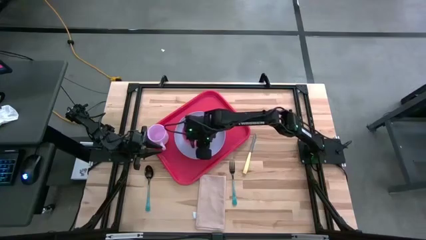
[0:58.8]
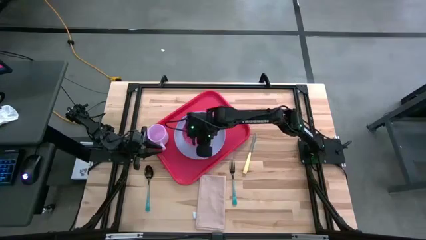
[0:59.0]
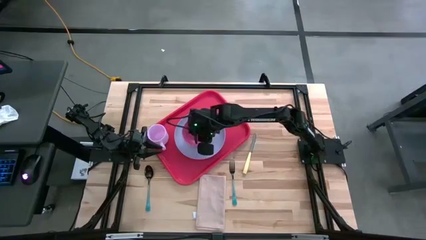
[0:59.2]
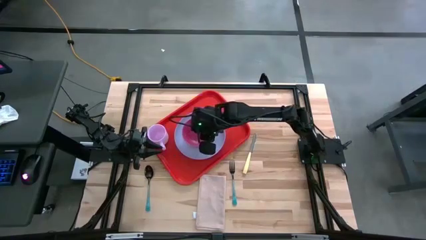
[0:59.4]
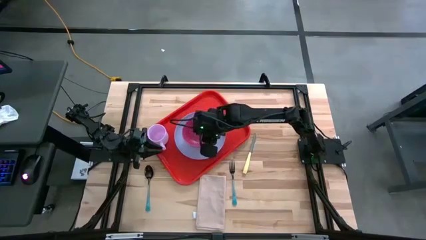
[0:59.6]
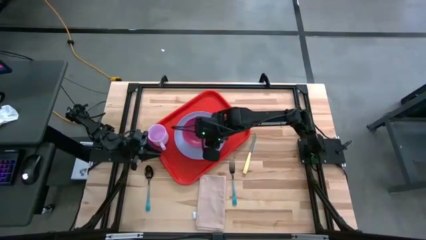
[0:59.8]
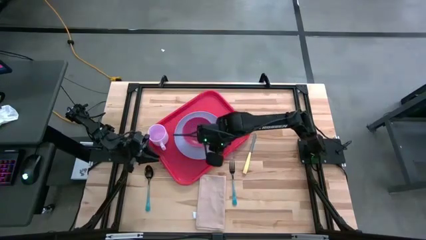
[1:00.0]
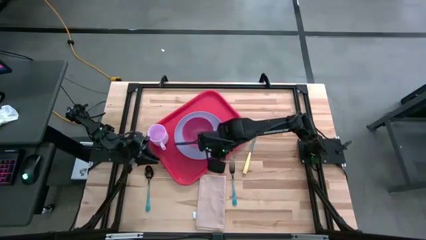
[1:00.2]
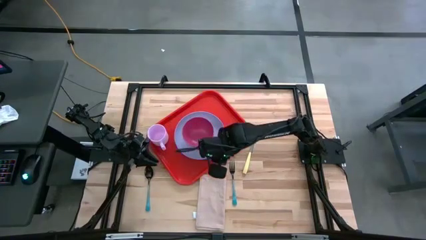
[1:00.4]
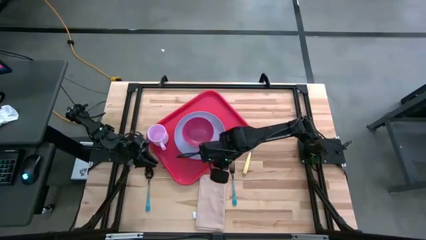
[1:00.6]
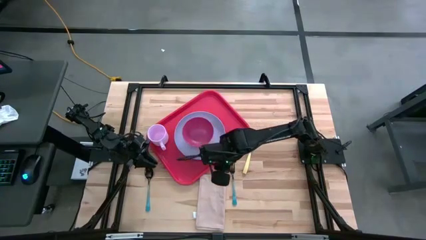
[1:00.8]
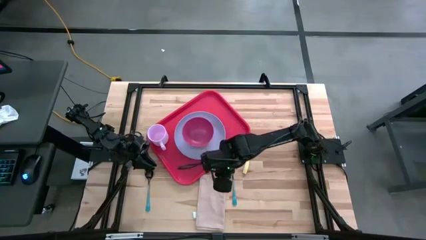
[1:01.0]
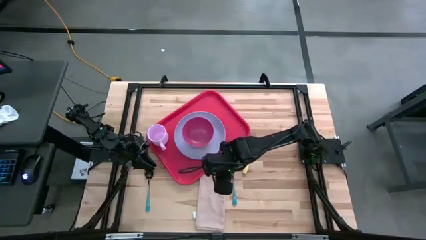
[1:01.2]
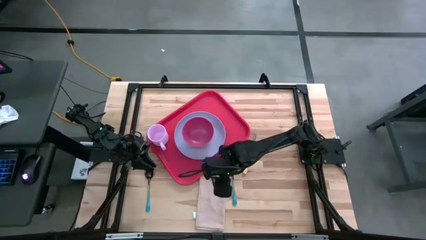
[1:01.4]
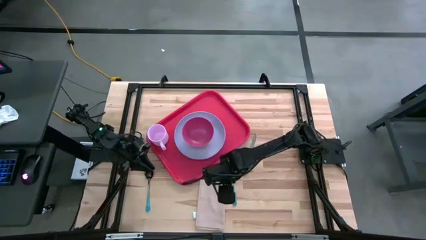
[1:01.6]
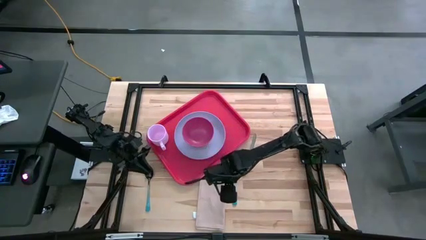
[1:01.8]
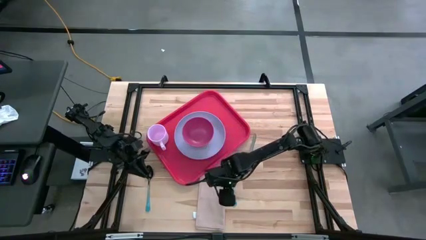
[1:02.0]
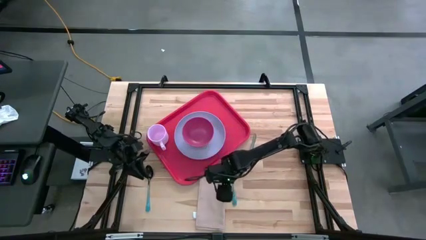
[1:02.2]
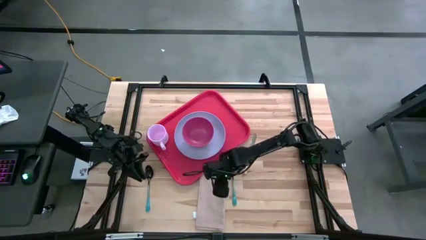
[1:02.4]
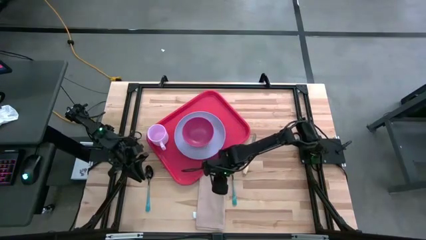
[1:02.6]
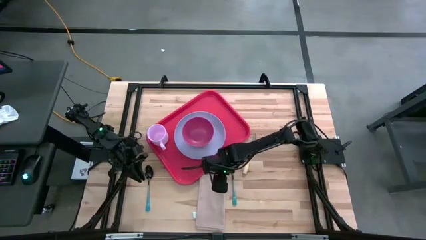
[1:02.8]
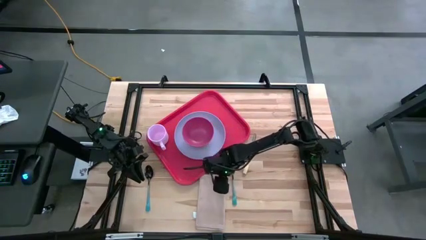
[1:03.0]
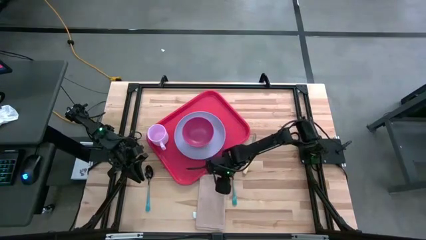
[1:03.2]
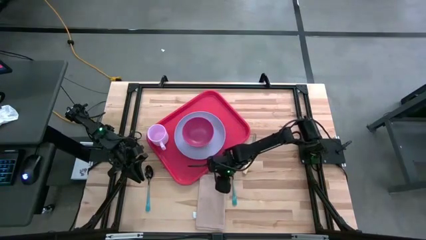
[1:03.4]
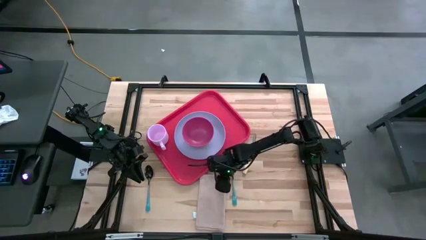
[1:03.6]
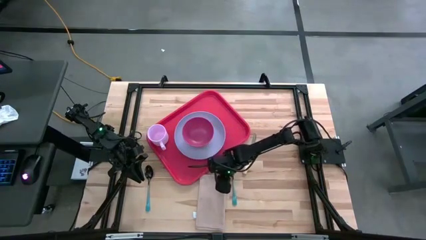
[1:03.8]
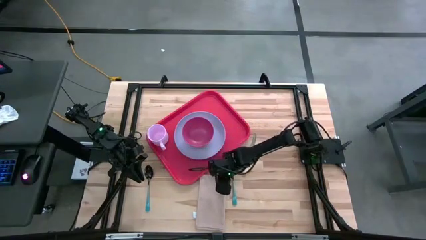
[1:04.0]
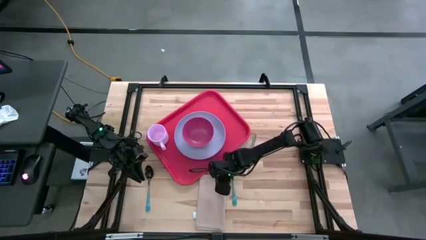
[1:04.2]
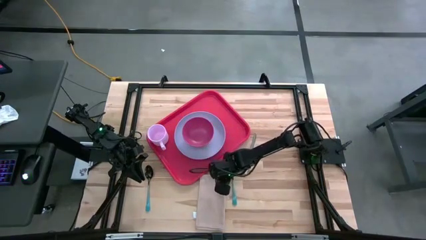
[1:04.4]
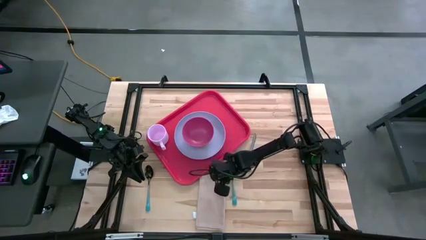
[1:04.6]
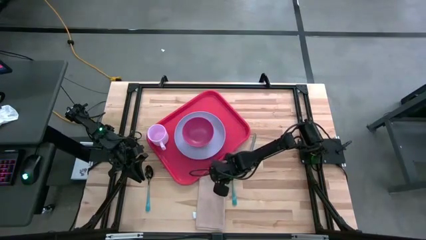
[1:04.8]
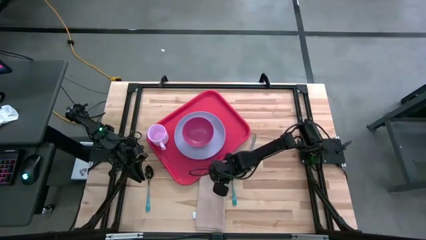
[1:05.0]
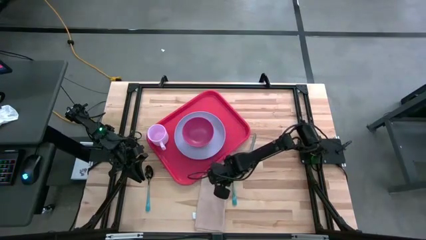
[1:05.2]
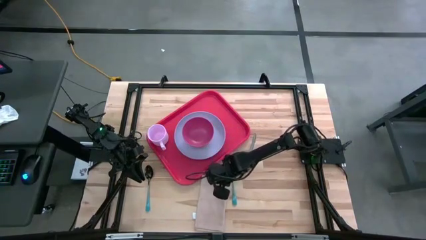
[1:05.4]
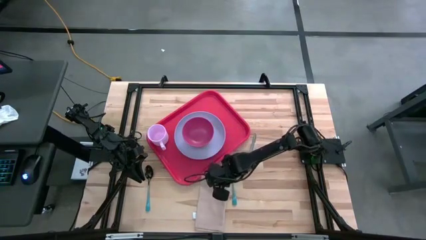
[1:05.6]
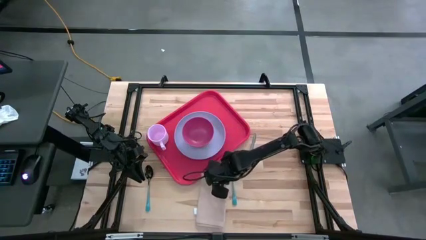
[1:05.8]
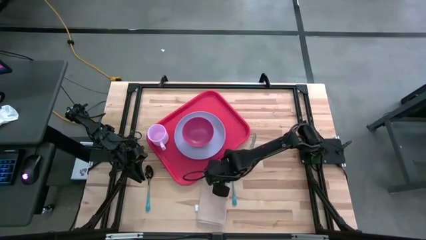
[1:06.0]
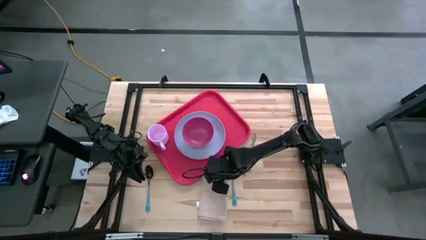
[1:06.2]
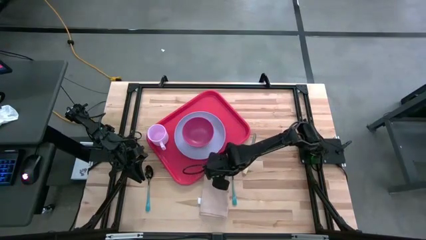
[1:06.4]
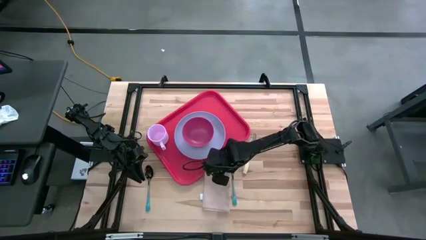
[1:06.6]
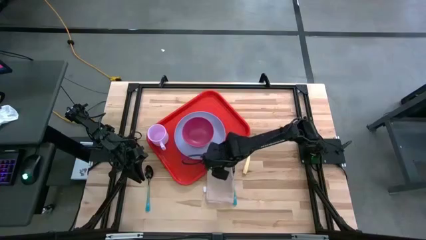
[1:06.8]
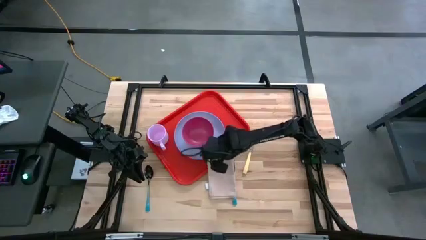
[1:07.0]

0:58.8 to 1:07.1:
Task: Set up tray
Put the brown table napkin to the right of the white plate on the red serving tray

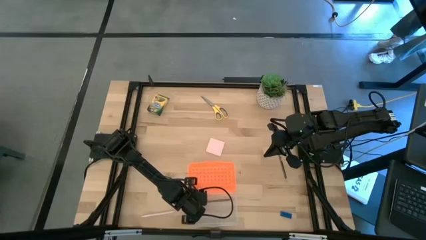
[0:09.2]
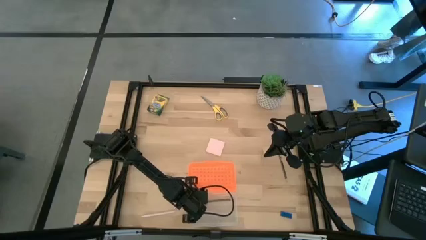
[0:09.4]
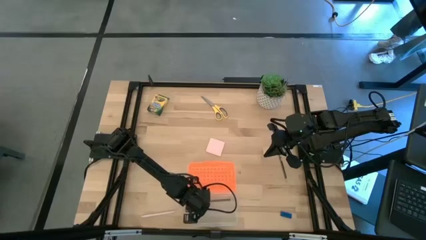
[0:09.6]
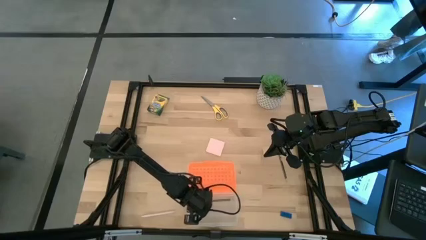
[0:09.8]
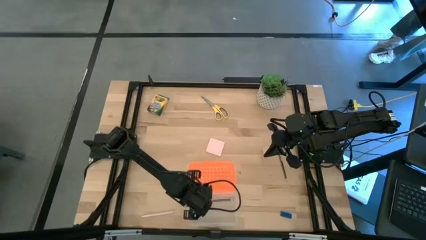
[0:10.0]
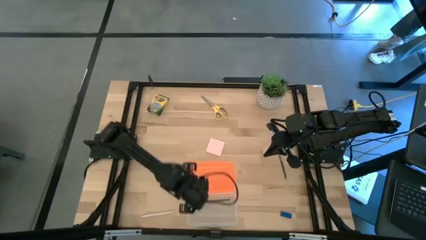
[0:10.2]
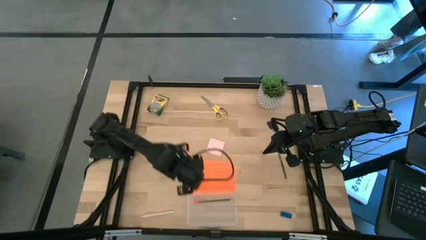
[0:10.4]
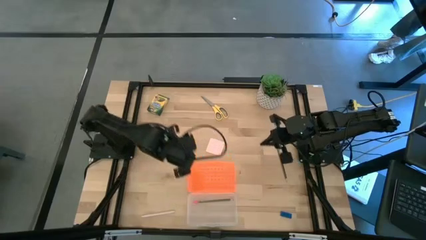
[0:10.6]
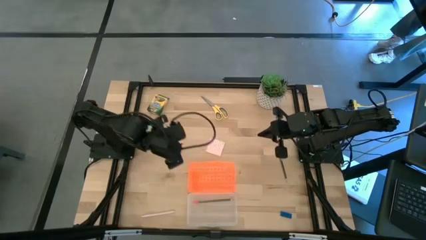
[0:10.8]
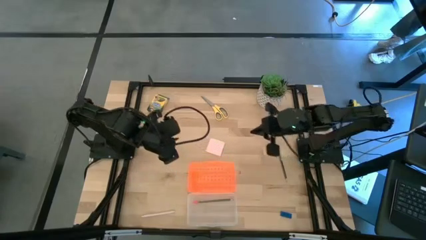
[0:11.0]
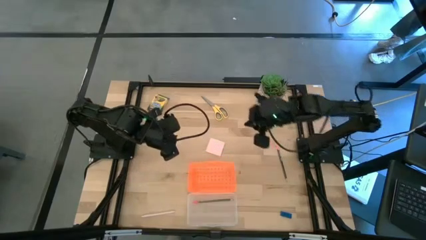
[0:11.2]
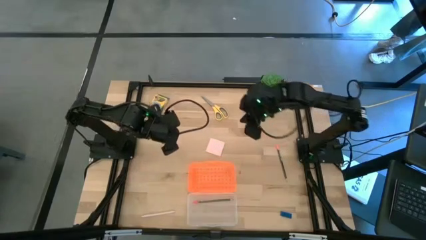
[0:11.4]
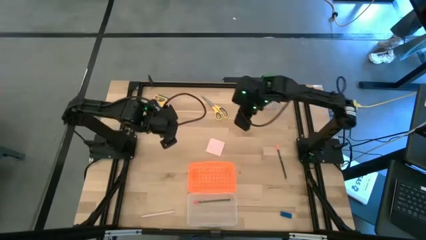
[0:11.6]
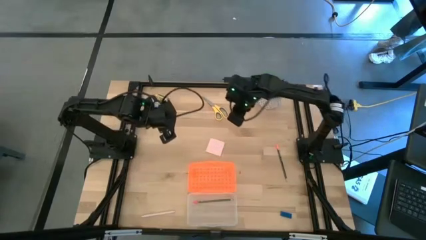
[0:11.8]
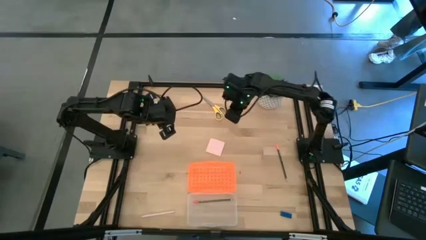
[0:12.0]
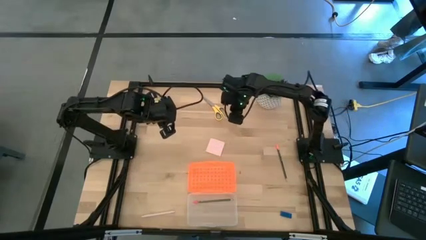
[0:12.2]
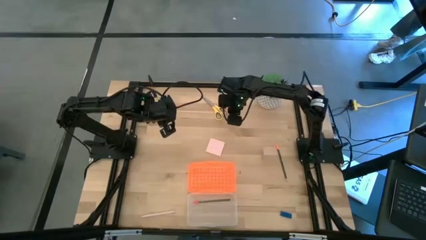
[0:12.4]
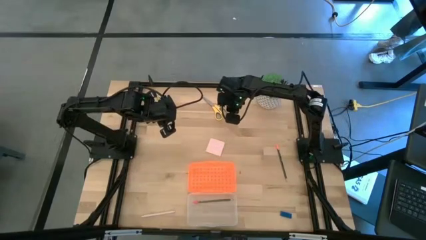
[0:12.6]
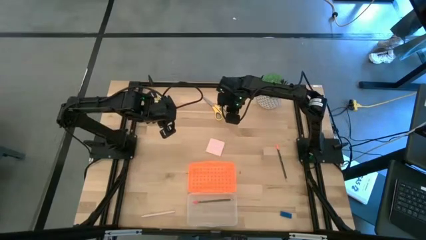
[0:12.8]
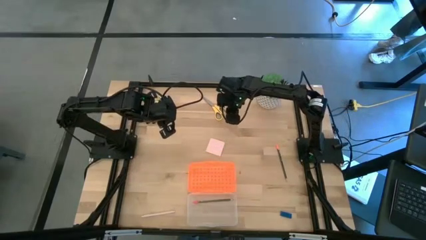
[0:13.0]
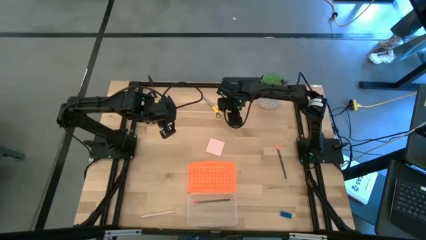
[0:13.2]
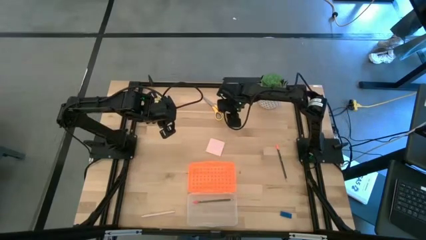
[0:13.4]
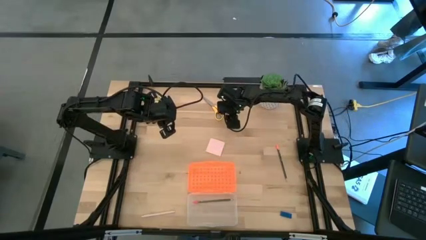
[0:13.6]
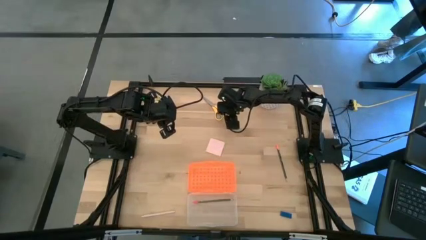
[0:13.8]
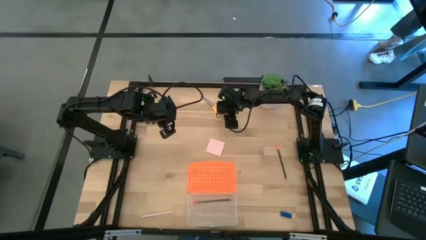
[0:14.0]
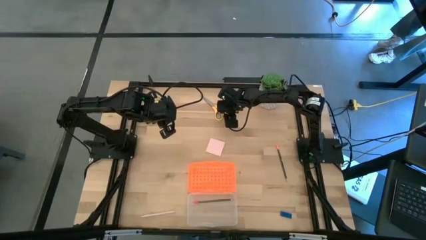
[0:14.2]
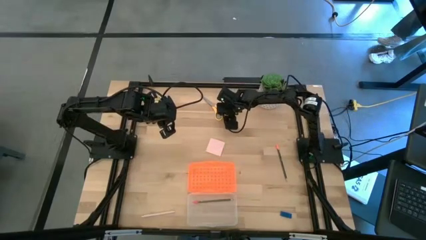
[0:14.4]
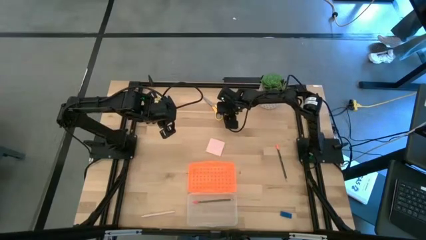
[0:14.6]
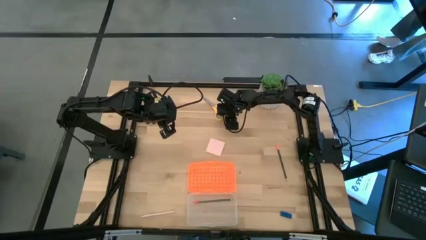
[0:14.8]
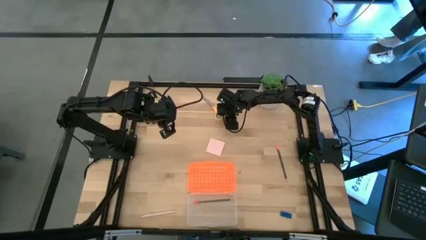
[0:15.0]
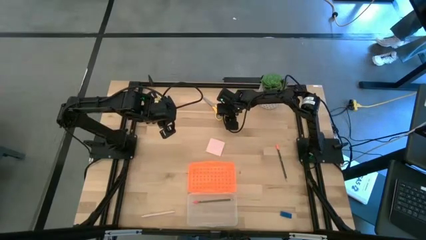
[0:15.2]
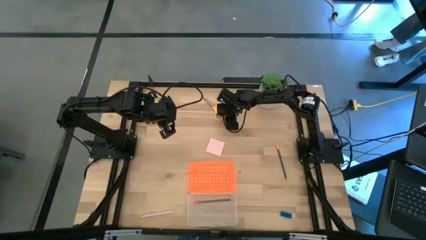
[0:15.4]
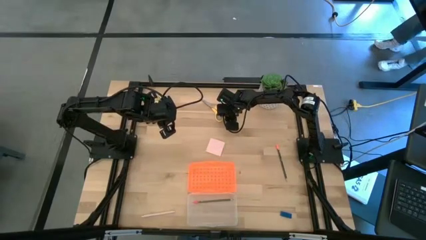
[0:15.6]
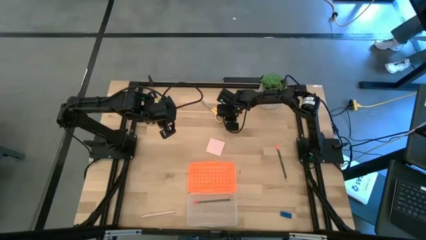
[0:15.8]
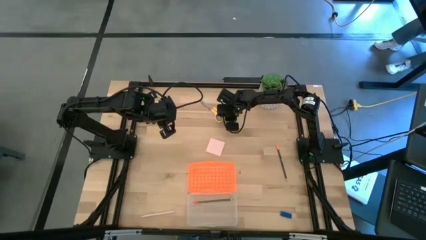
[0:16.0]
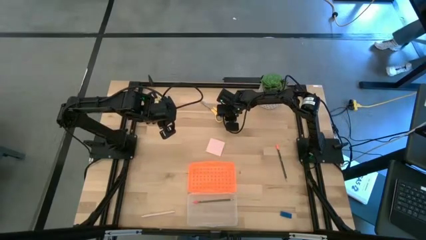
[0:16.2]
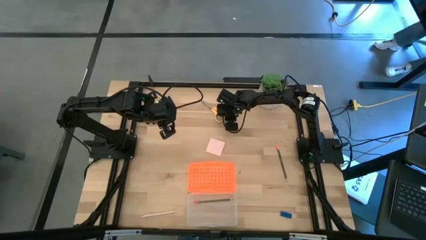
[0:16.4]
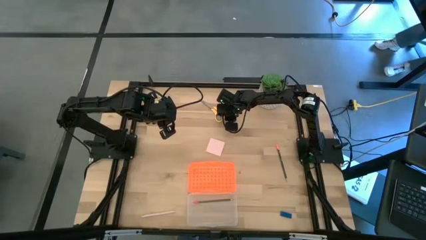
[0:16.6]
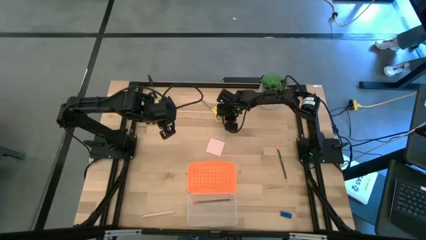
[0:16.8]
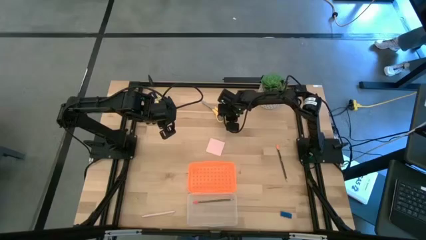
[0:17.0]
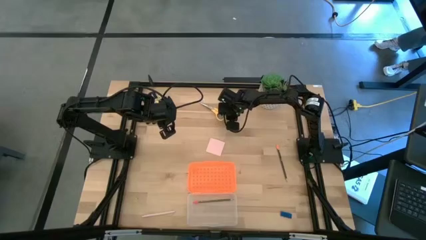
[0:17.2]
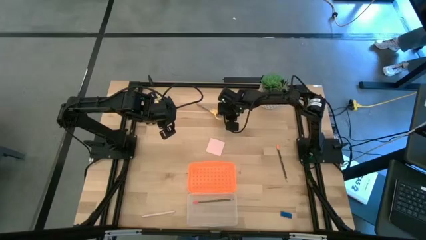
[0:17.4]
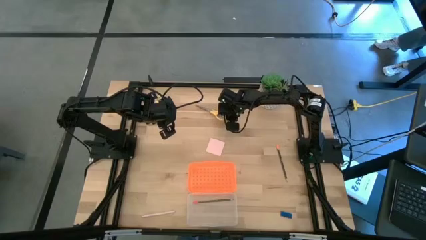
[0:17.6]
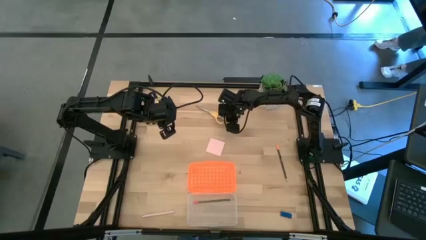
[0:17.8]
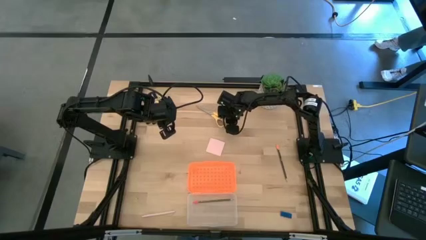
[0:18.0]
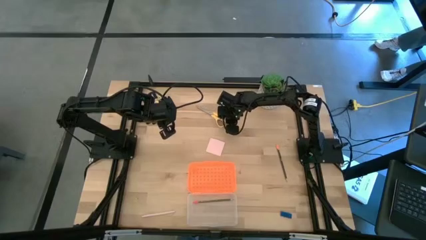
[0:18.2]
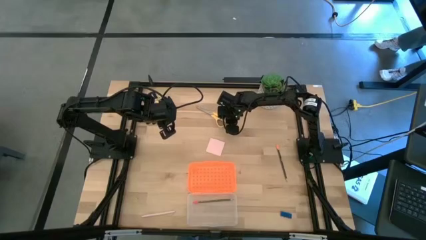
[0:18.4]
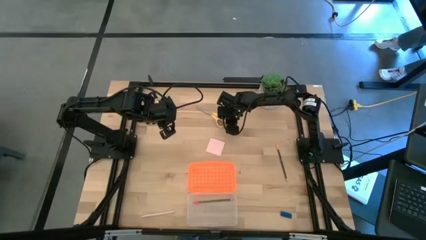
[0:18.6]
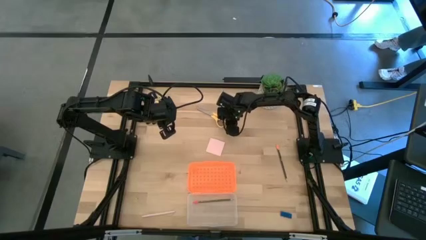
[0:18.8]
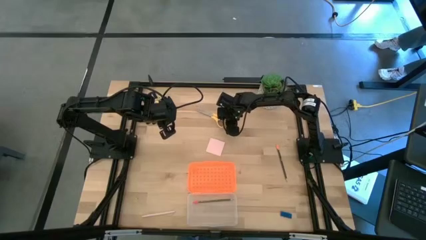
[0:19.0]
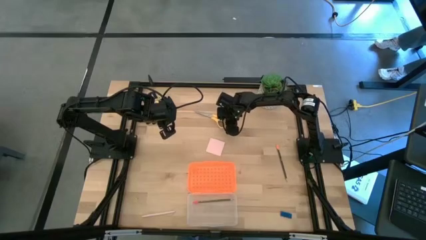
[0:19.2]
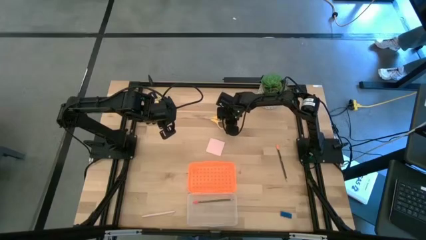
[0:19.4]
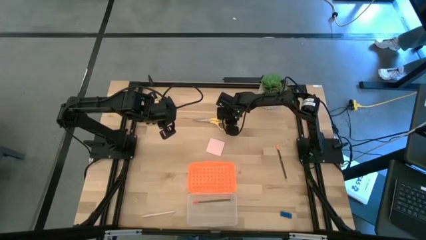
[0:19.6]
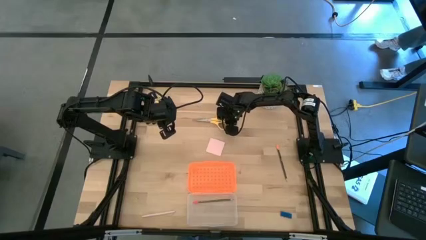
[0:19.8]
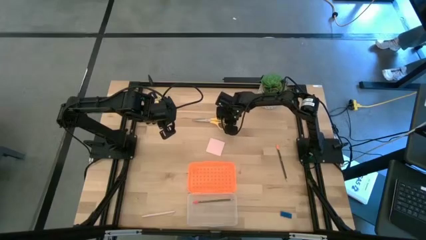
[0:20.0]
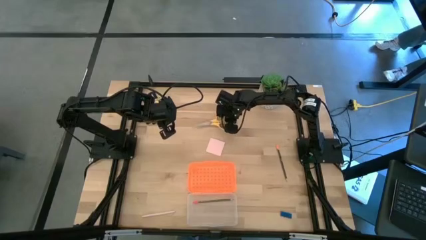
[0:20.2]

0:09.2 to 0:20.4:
Task: Pack school essentials
Put the yellow scissors into the supply box
